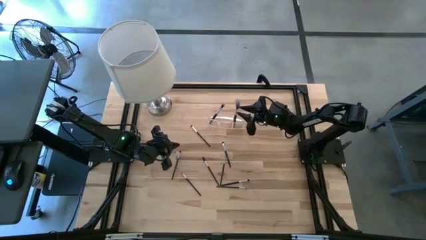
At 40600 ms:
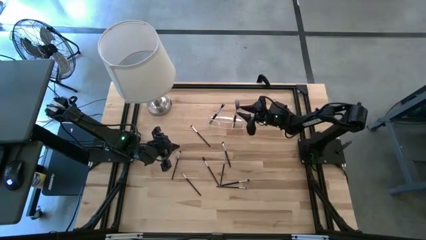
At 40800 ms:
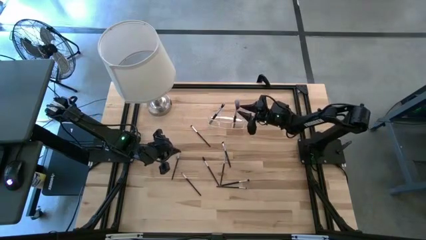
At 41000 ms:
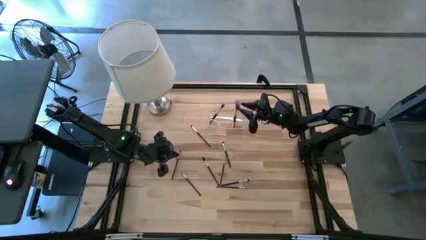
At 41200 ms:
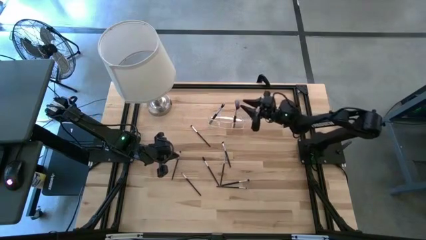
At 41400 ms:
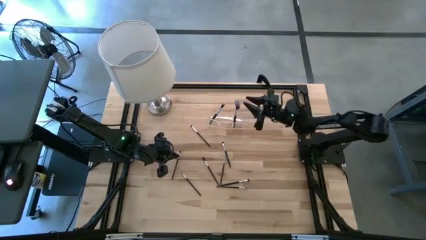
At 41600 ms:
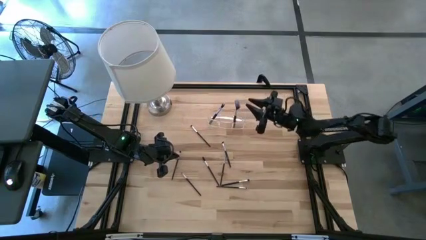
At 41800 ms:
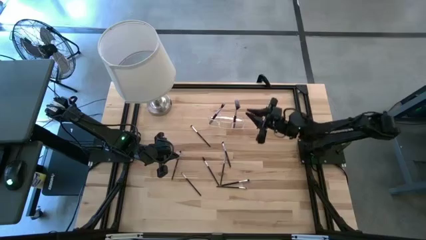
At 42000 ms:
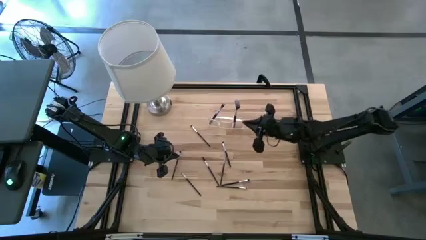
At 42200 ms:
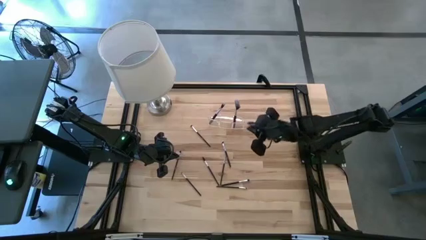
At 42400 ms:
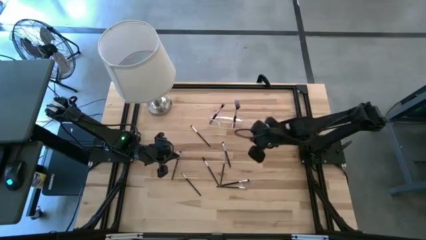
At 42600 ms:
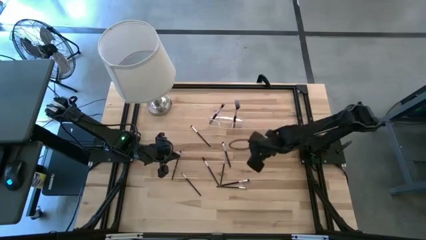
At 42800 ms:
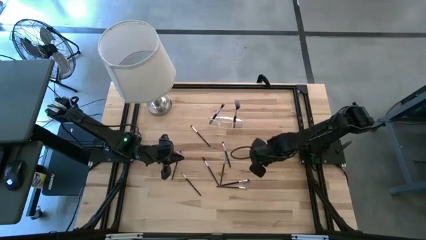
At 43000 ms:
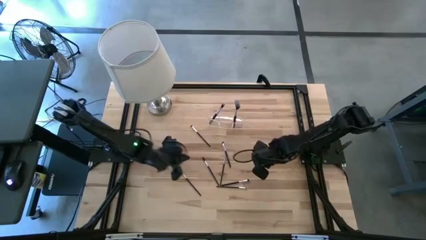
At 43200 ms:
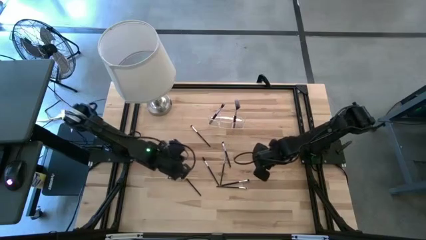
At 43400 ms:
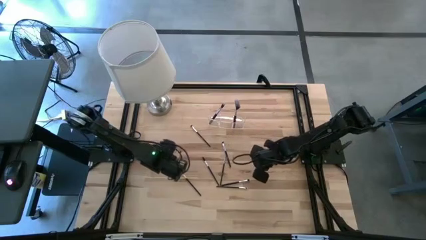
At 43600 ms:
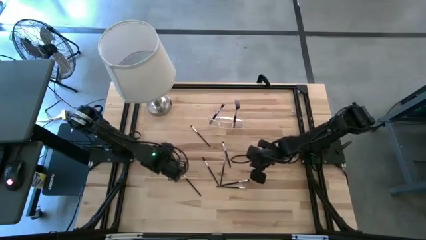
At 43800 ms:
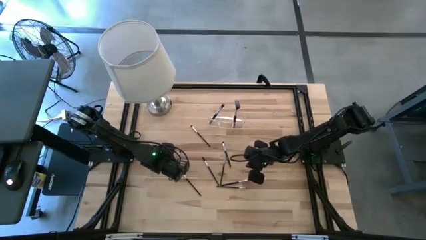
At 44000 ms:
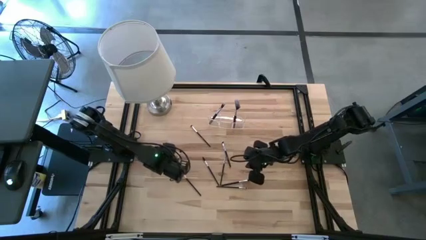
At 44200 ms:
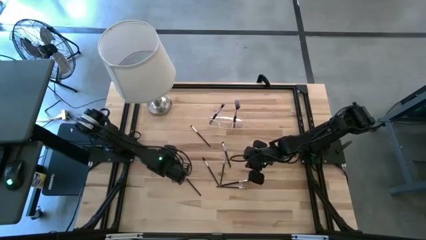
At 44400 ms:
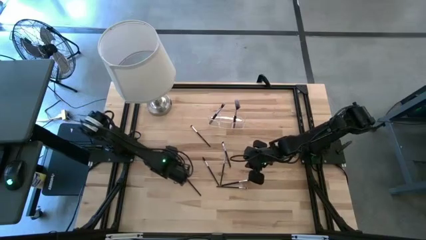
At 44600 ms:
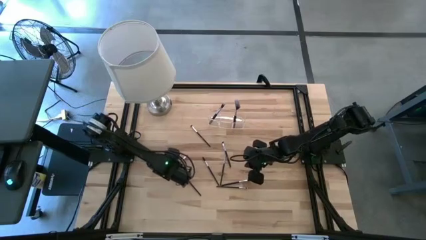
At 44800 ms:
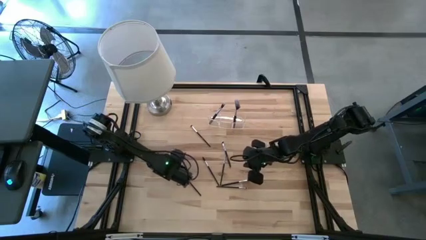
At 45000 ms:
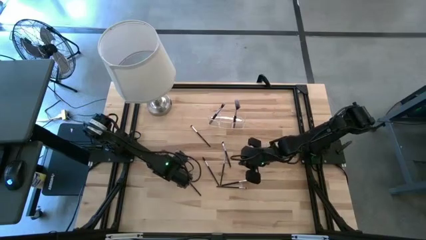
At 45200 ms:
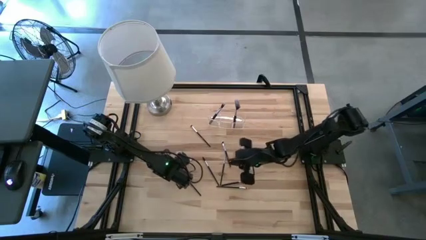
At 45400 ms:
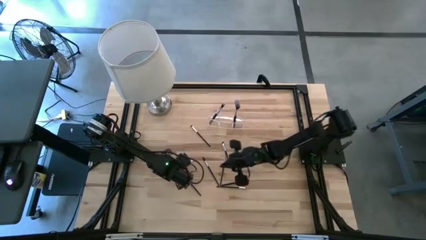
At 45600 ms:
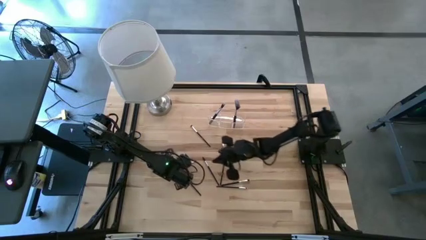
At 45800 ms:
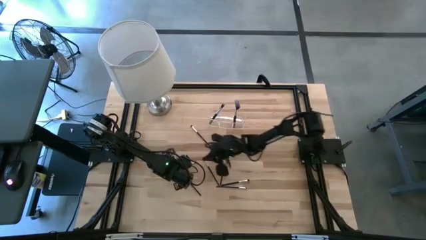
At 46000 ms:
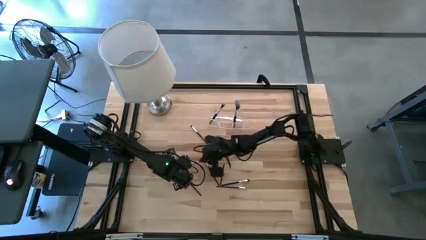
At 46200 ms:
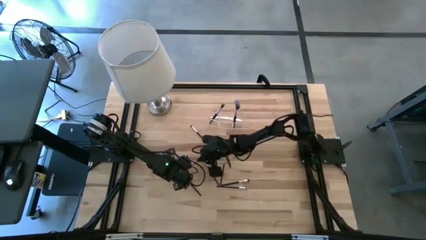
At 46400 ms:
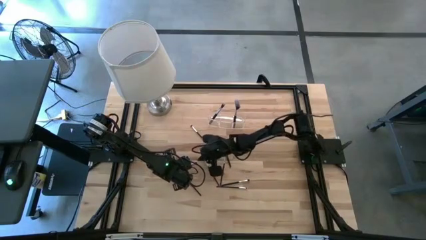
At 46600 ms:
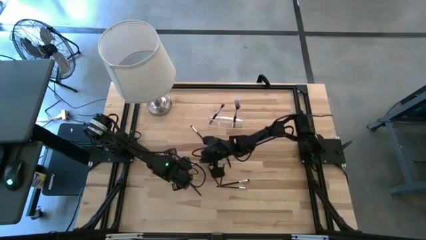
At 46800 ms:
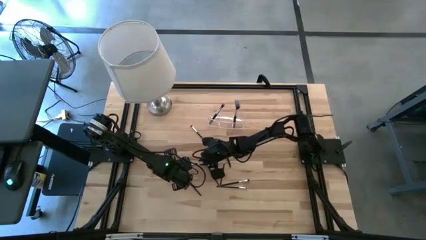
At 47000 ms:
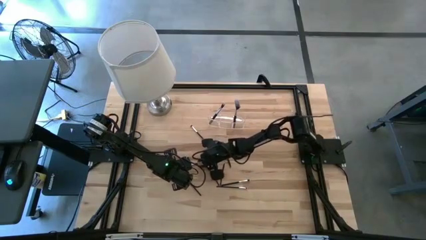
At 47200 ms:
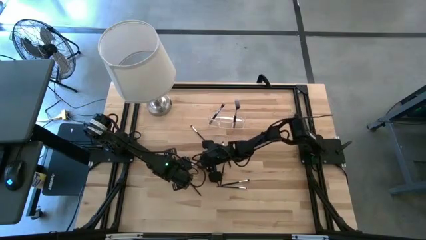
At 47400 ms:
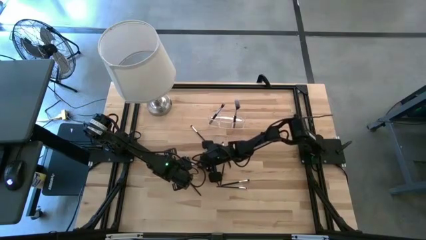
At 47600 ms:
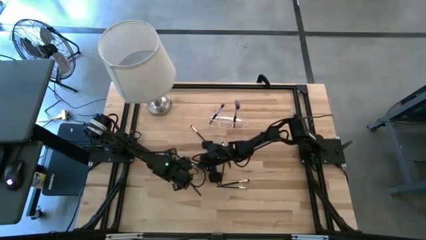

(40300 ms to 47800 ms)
Task: Put items in baskets/containers
Put the eyeshadow brush into the transparent organizer

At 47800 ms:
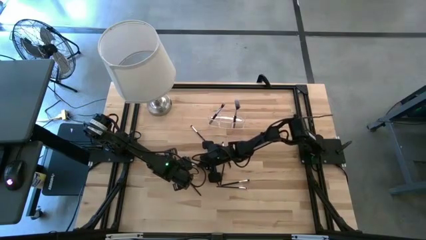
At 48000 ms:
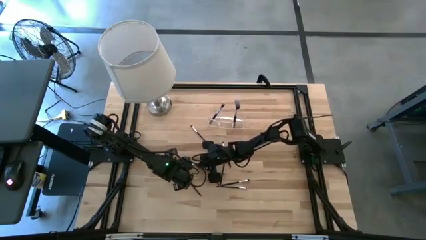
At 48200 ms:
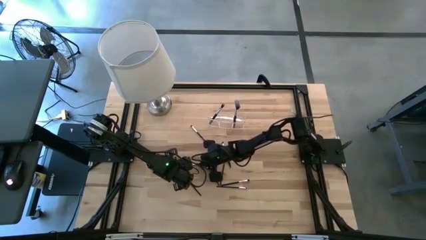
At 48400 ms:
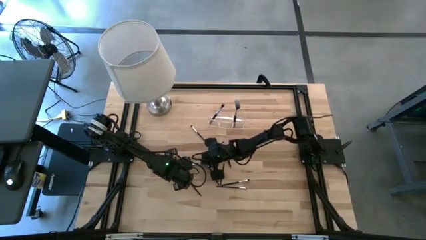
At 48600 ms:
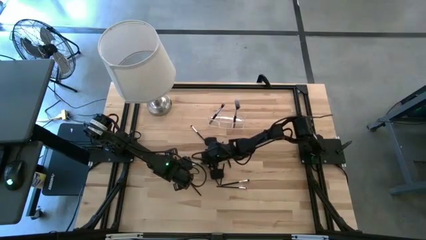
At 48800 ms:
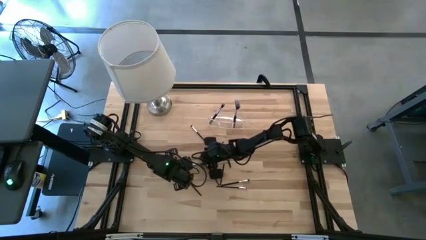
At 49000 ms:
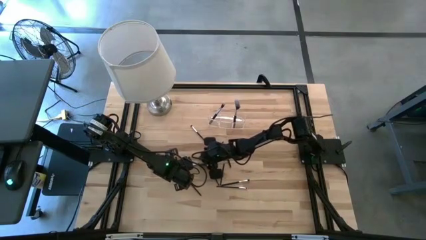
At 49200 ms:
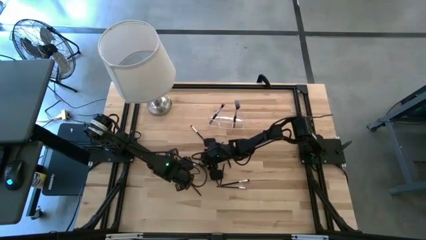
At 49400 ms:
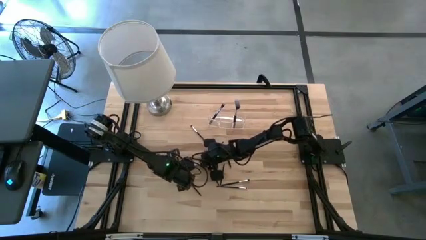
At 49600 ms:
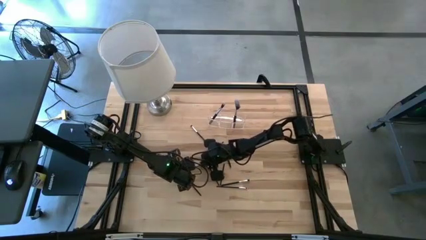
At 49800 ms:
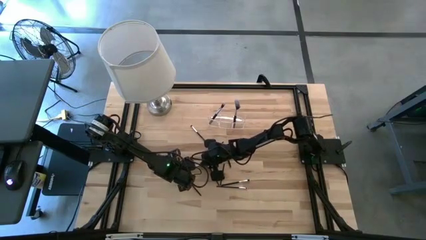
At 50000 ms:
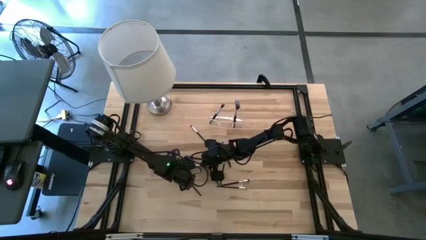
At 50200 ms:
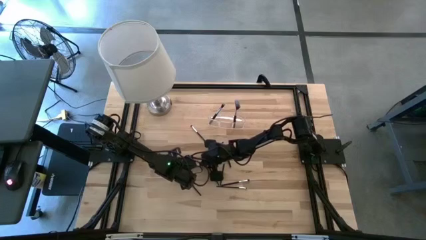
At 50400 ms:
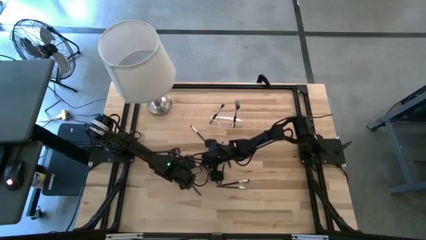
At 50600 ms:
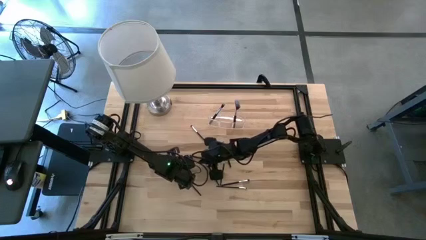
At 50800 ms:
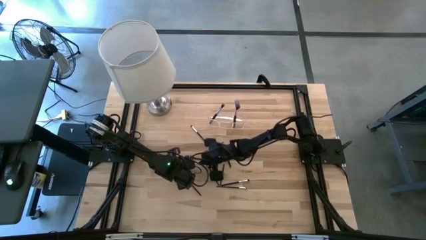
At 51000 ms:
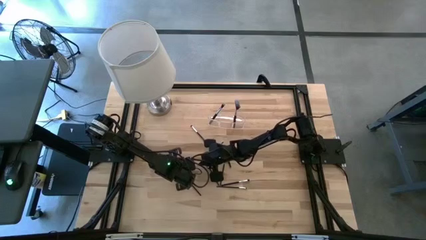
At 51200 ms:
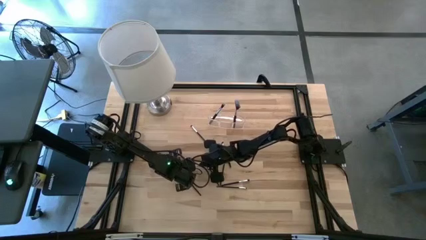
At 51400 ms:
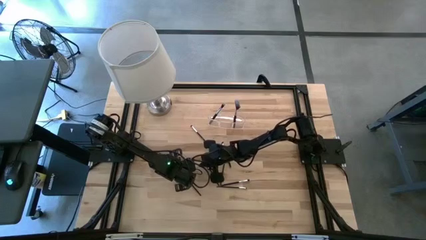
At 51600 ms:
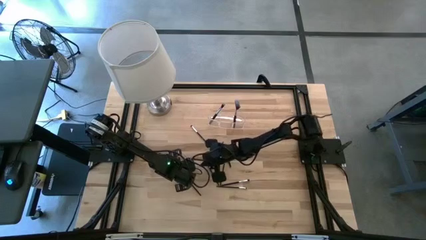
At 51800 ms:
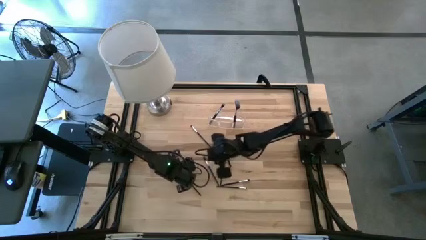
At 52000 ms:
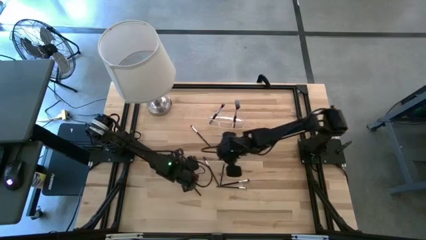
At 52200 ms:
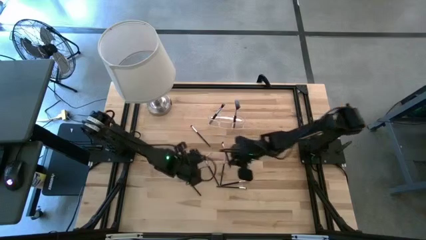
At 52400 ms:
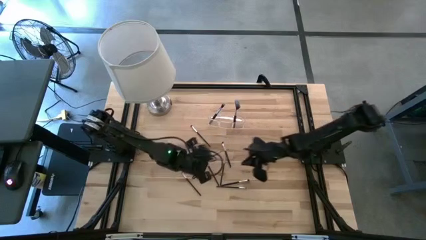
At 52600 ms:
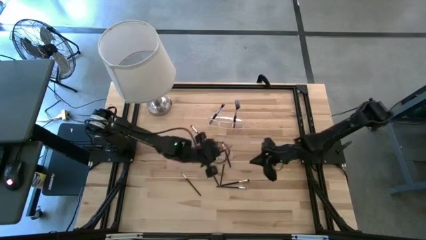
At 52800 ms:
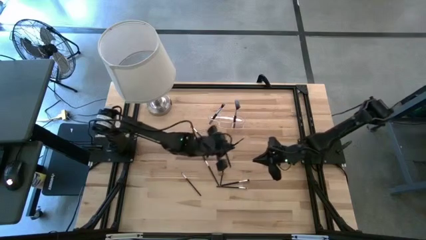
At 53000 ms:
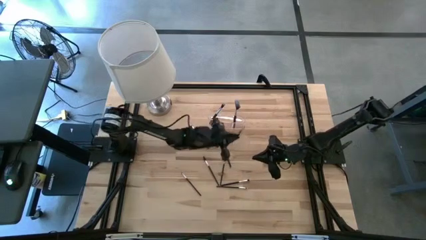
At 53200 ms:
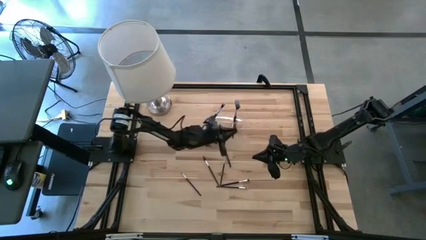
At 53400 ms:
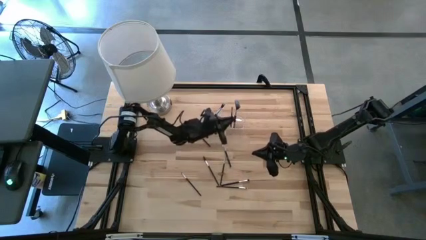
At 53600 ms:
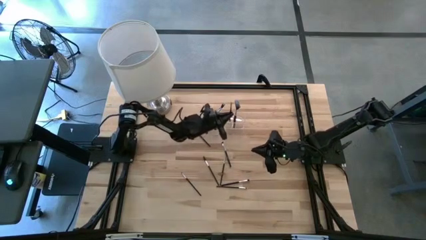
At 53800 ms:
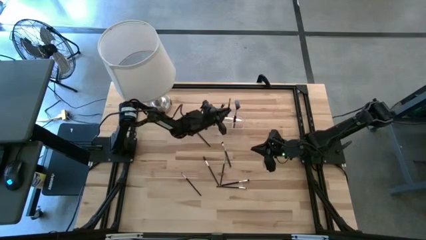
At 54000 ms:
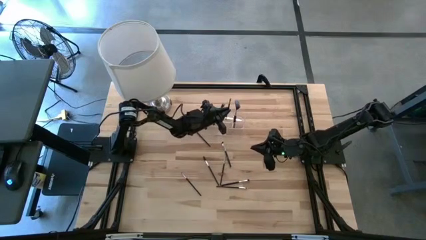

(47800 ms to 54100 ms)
Put the eyeshadow brush into the transparent organizer

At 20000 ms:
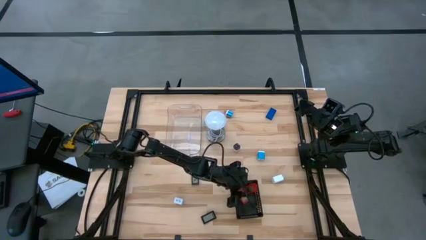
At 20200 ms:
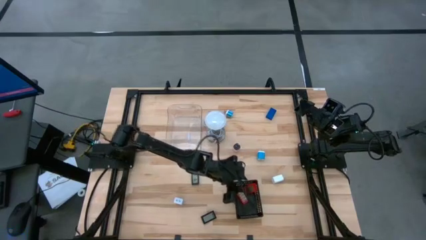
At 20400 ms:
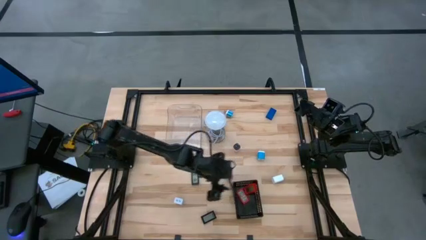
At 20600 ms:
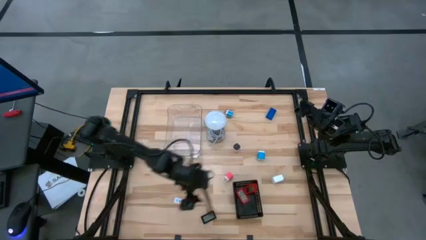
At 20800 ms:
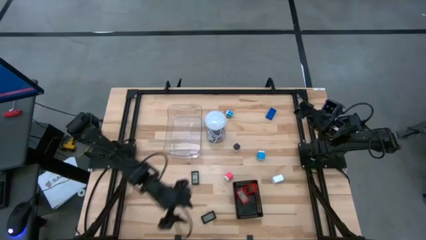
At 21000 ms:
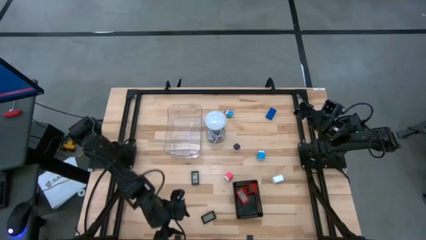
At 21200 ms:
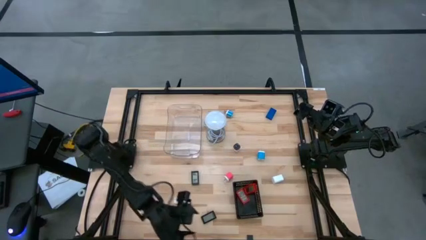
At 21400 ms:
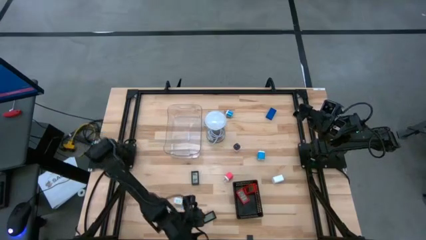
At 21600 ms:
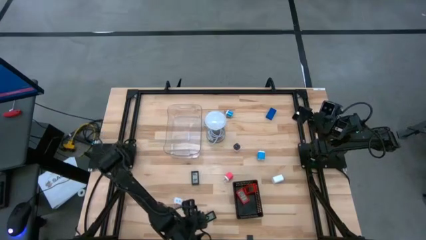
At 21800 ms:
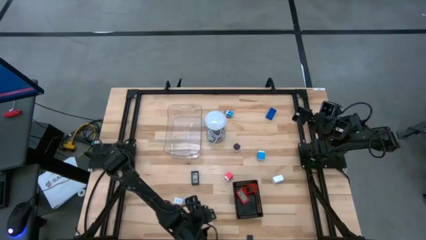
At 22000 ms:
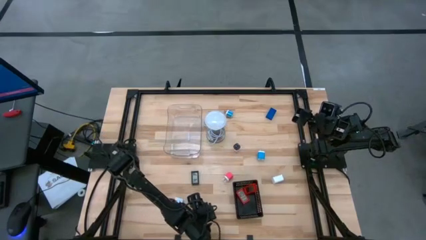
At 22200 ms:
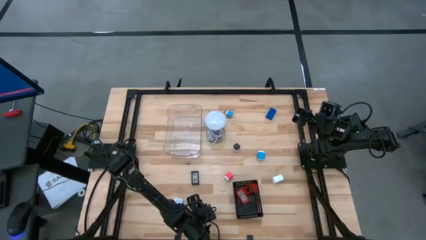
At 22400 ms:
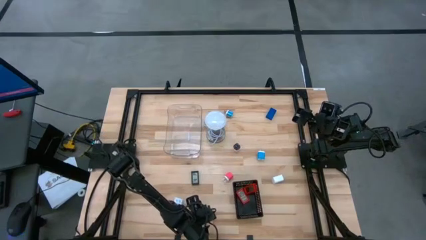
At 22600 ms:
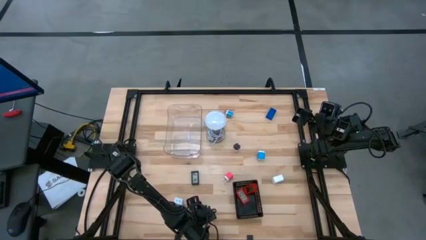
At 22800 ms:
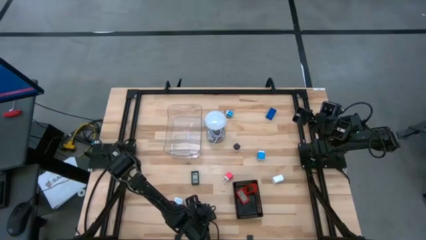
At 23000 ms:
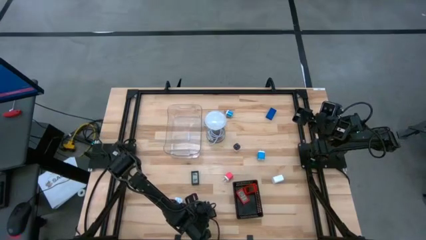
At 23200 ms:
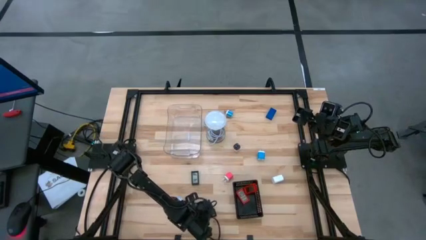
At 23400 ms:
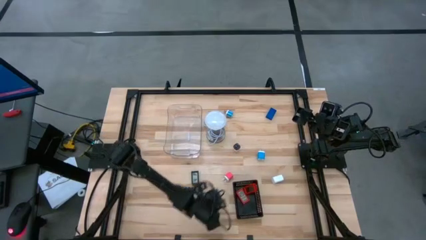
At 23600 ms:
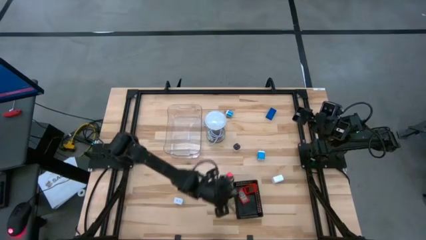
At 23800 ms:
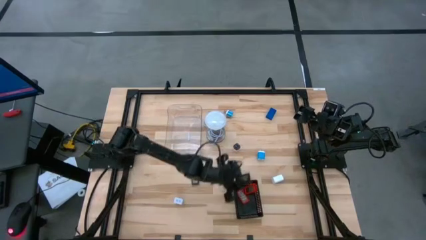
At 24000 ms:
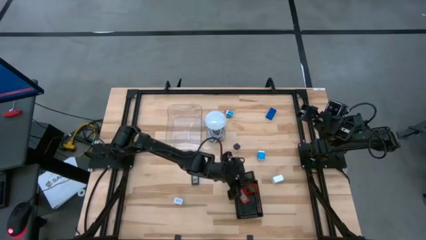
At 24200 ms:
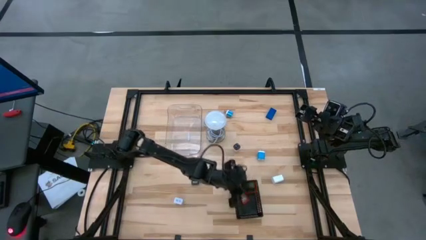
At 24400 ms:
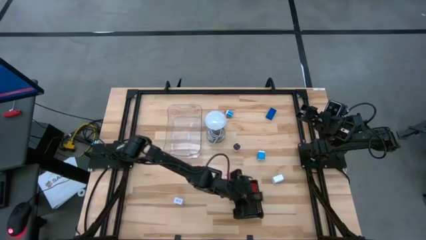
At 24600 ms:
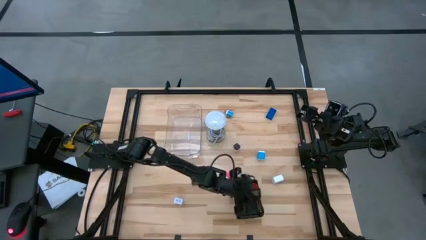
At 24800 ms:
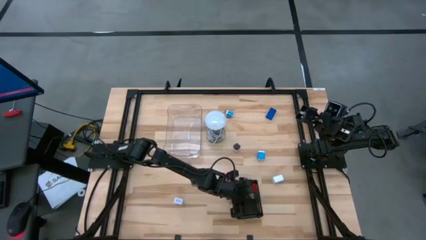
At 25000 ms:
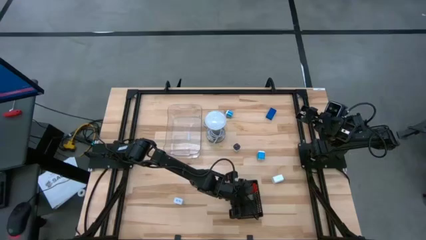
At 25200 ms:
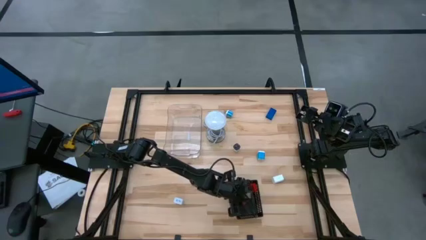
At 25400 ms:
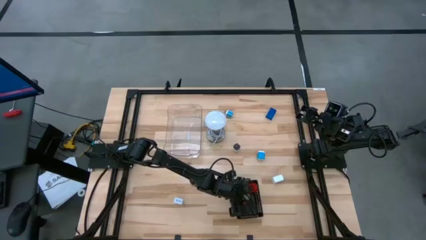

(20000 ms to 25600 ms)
Task: Pick & Place Office items
Put the bottom black digital clock into the black bin
